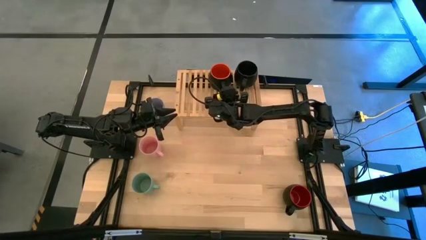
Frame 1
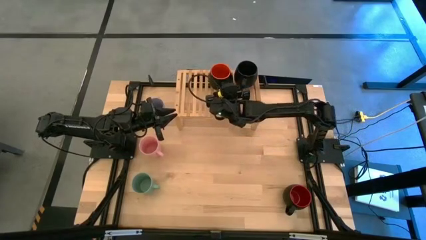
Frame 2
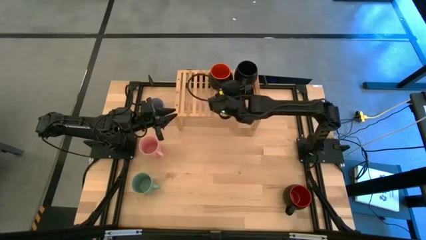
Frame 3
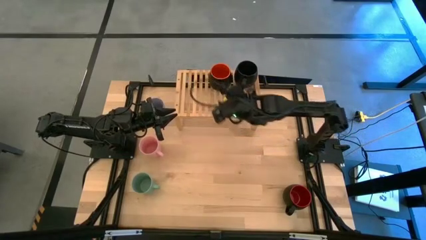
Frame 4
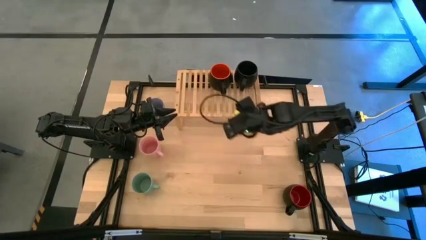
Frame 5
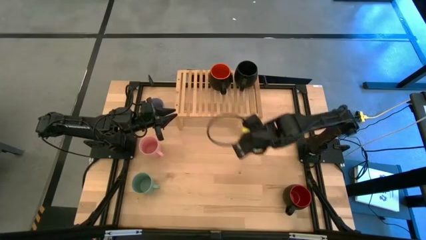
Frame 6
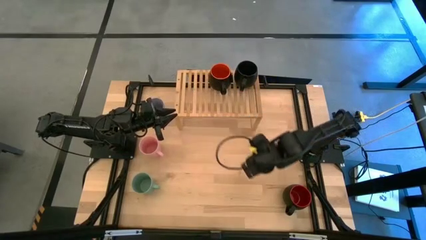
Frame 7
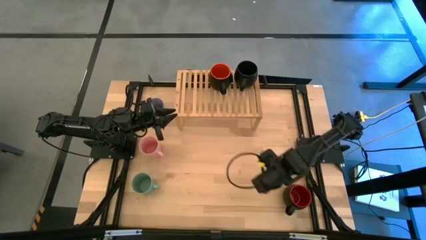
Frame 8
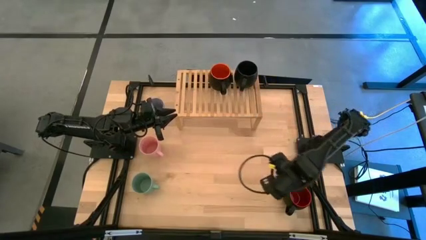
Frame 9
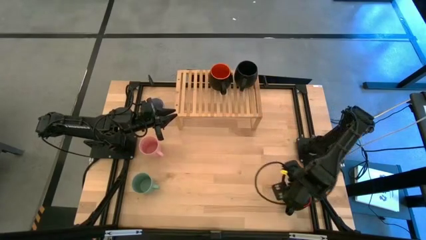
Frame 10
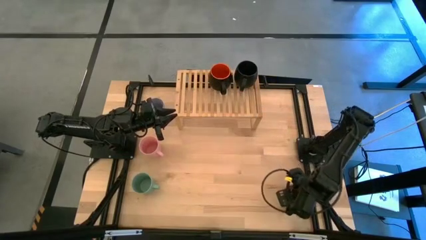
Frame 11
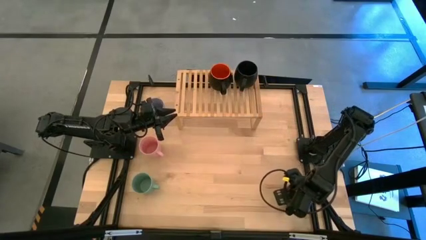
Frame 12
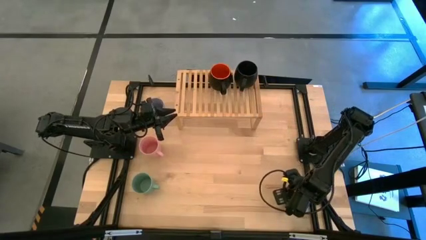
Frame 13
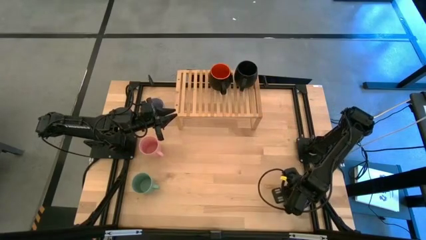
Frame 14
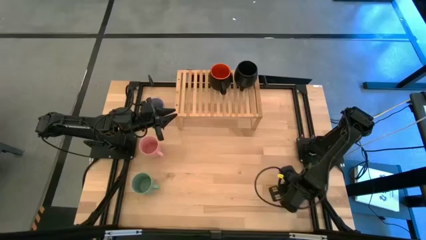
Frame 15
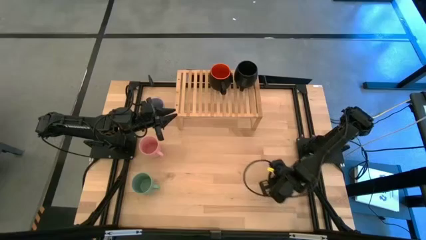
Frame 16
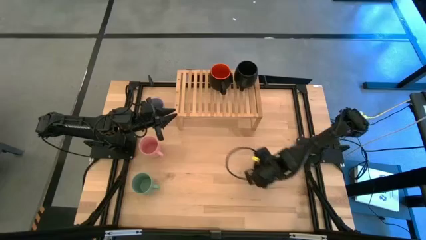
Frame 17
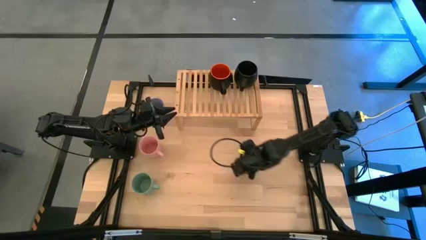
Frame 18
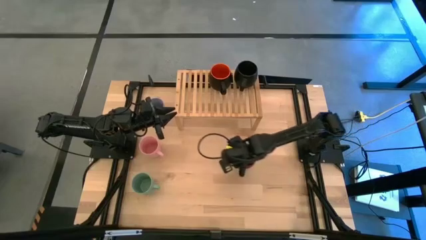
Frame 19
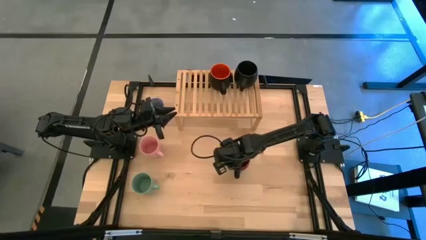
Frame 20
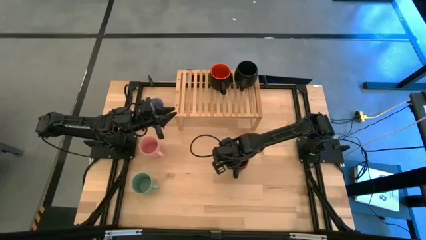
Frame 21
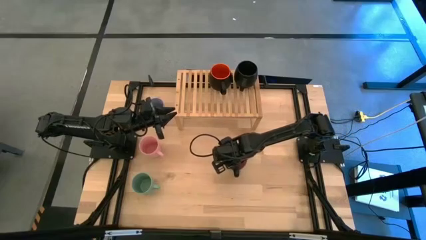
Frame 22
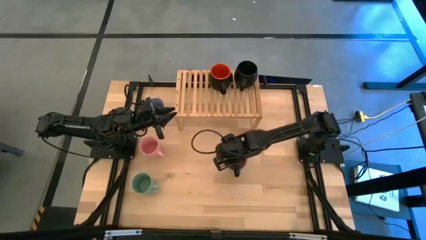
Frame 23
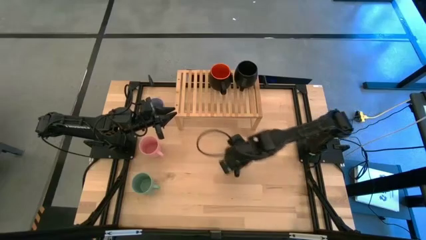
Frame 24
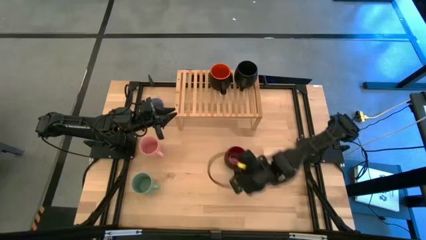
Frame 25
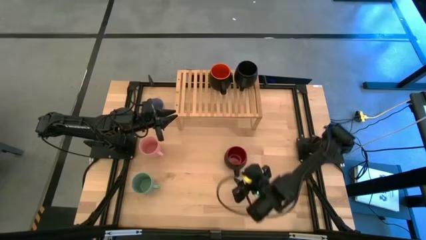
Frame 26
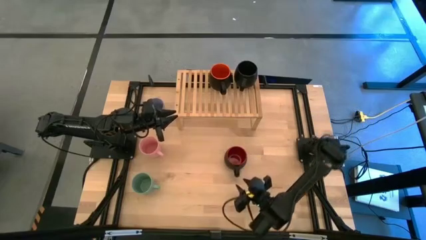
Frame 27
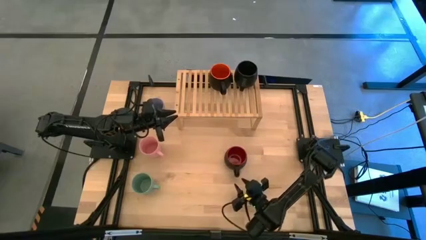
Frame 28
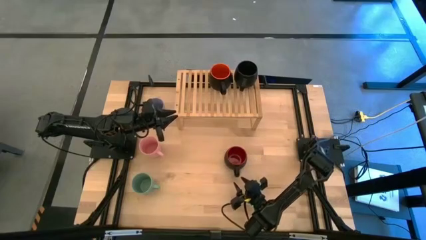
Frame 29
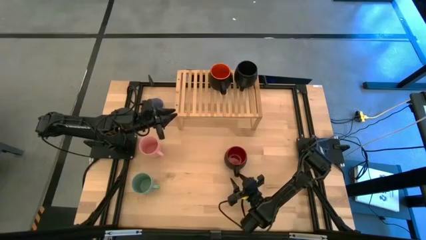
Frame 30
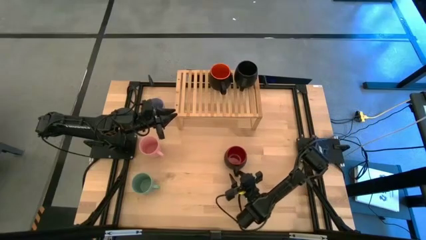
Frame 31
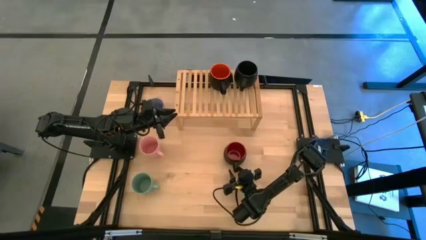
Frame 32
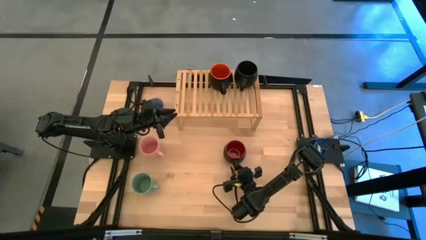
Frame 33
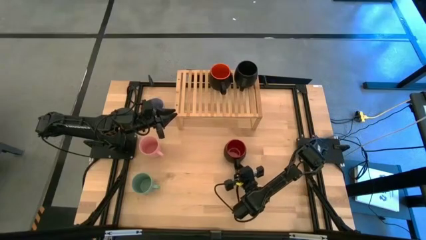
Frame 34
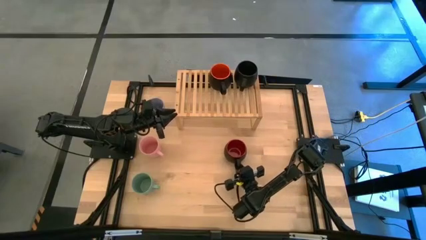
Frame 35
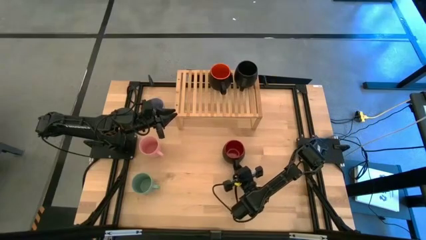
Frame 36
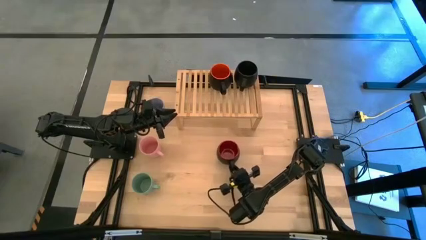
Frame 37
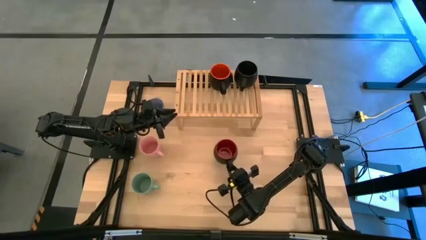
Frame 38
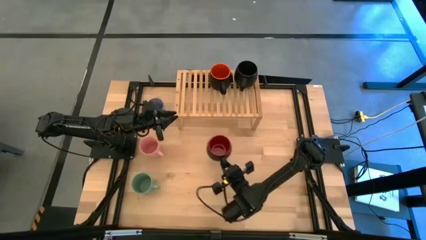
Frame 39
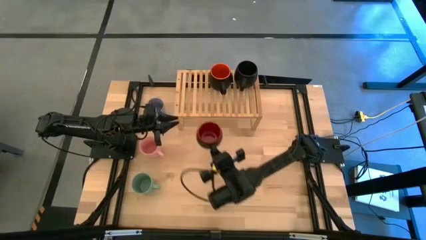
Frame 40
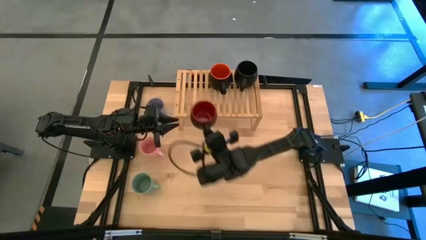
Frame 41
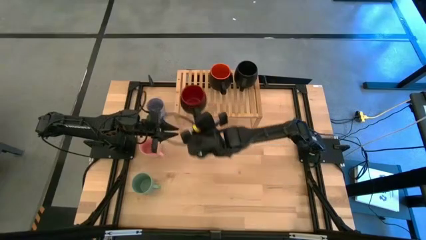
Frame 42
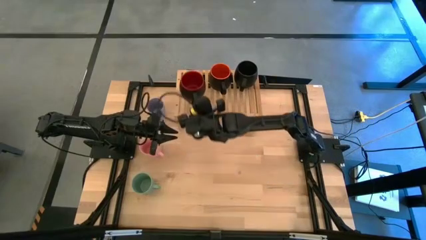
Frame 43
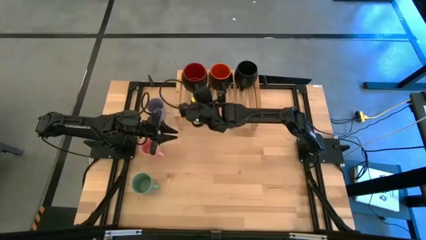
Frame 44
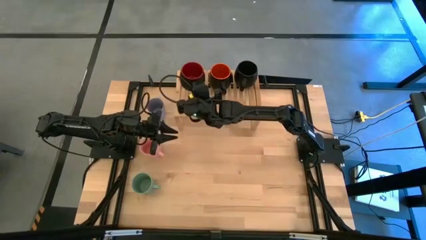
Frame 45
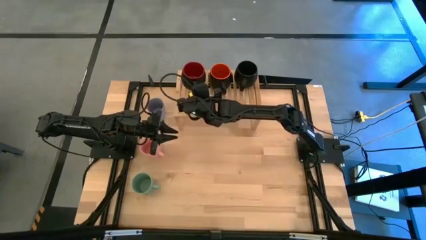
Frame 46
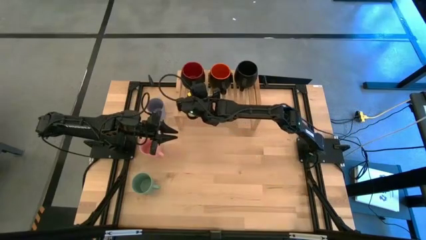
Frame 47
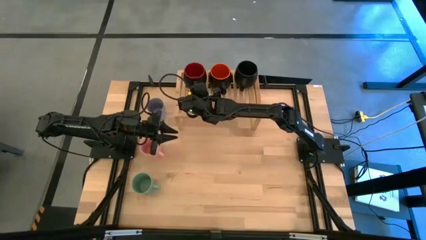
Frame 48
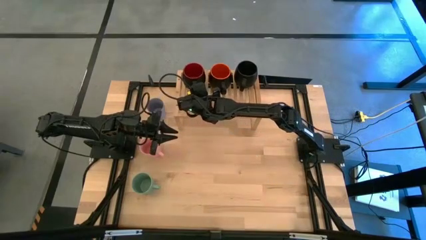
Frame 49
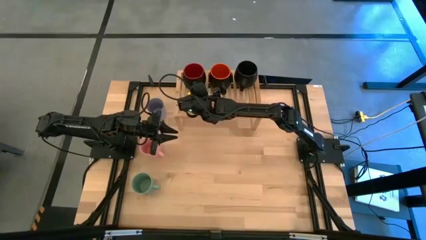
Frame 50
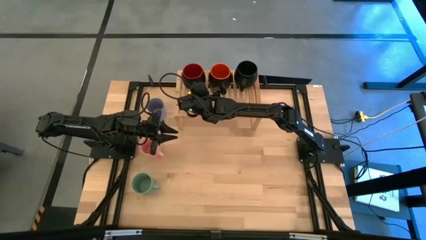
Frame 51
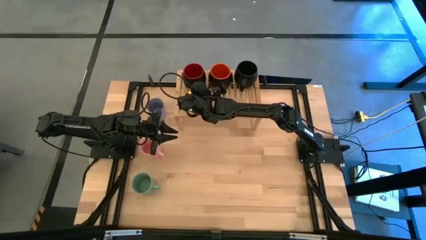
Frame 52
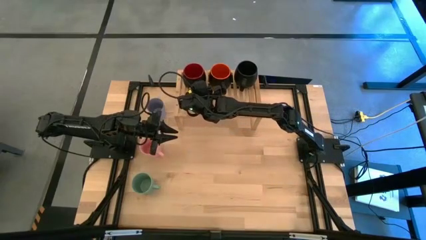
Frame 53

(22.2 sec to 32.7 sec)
Task: Place coffee mugs
Put the red mug on the shelf

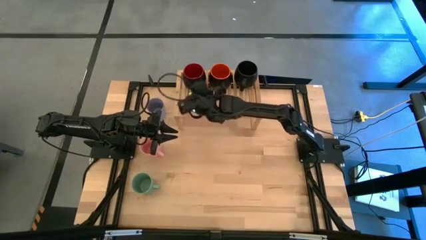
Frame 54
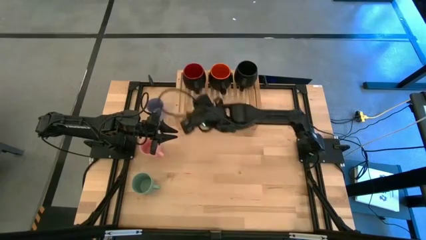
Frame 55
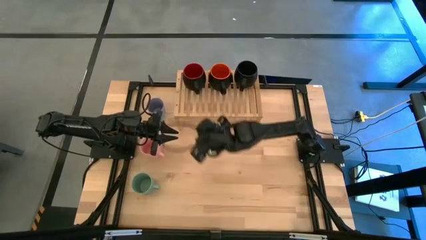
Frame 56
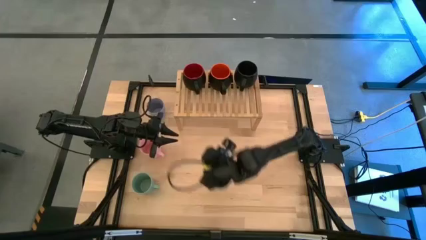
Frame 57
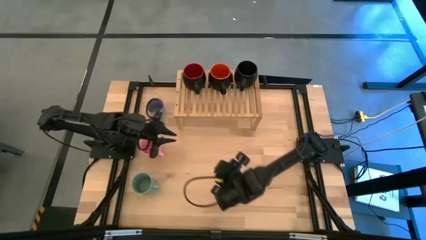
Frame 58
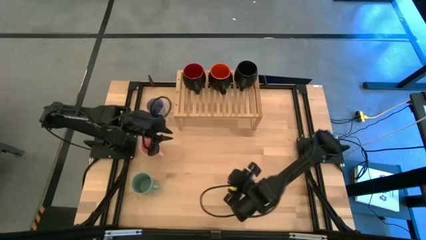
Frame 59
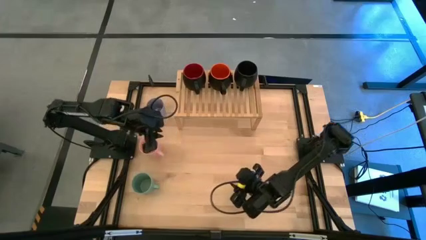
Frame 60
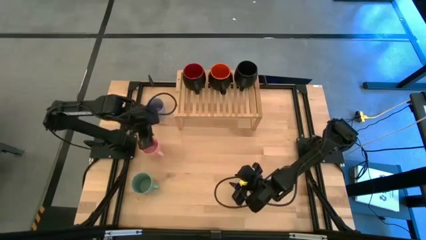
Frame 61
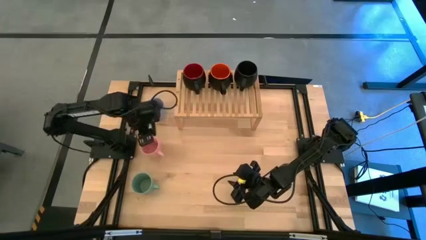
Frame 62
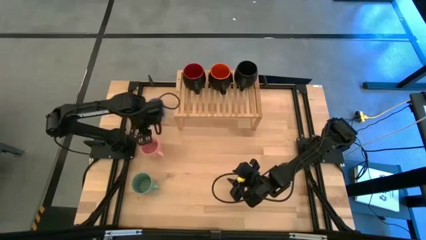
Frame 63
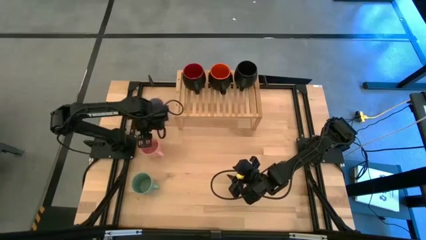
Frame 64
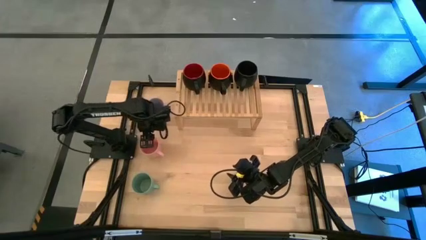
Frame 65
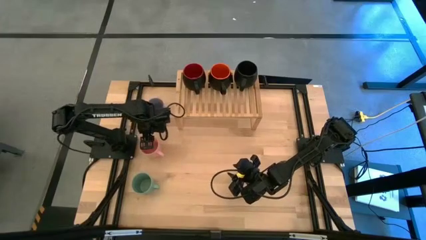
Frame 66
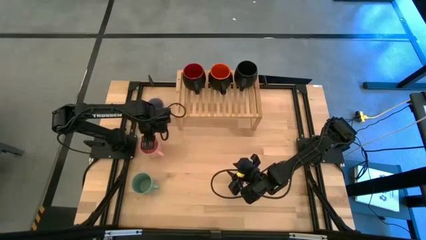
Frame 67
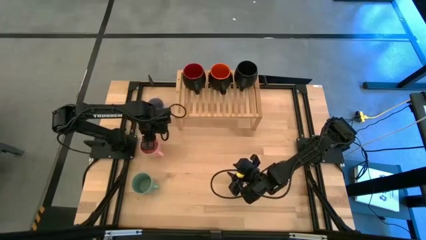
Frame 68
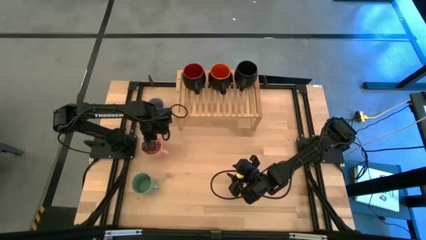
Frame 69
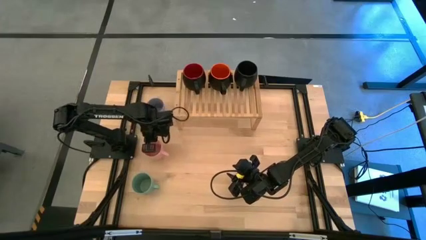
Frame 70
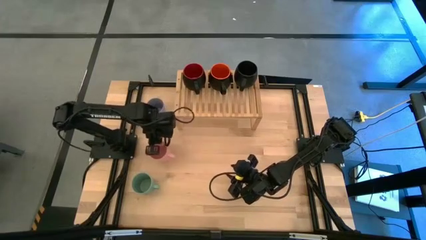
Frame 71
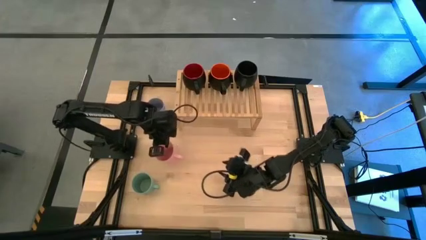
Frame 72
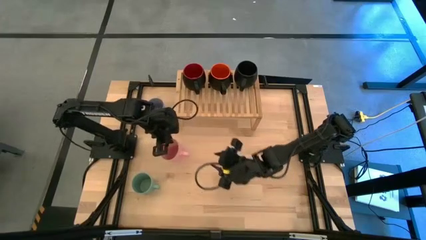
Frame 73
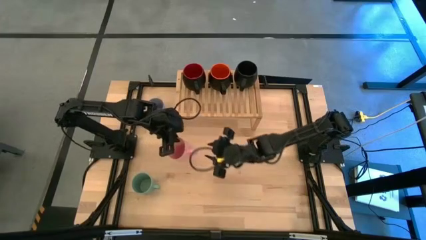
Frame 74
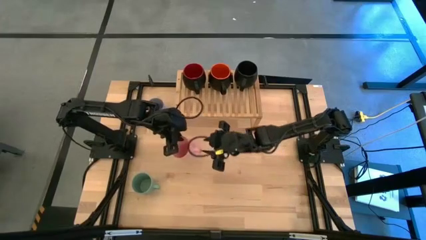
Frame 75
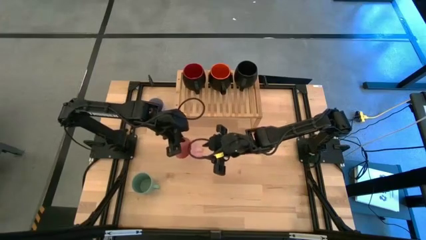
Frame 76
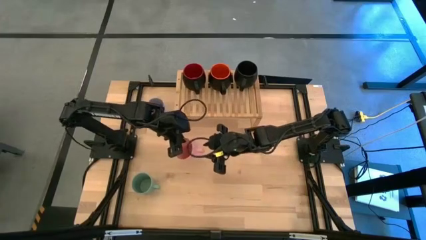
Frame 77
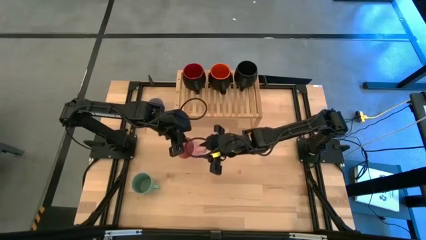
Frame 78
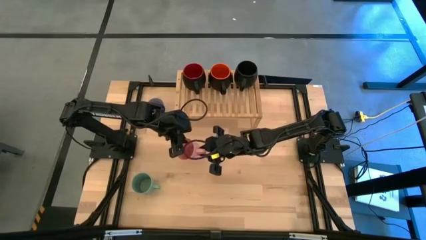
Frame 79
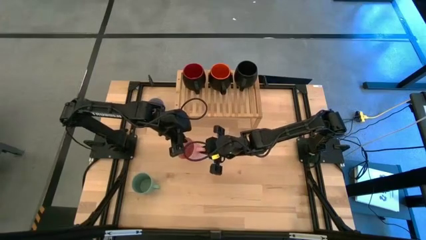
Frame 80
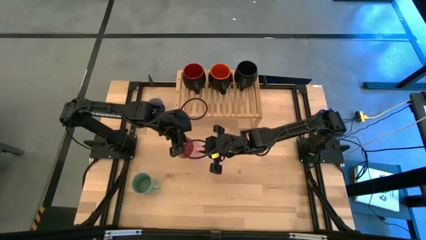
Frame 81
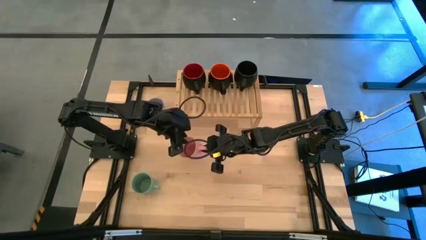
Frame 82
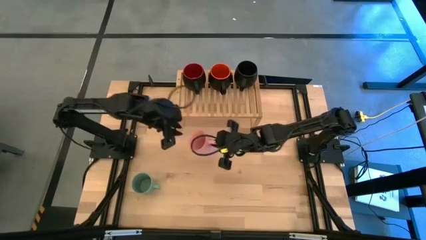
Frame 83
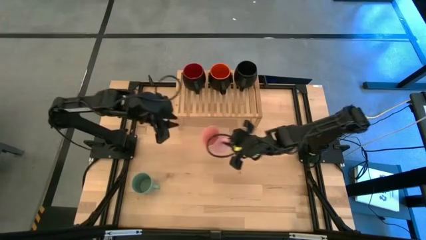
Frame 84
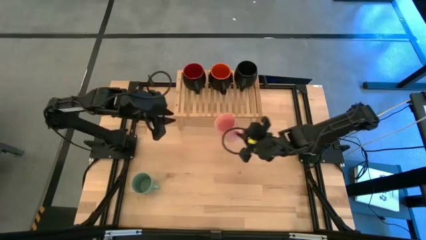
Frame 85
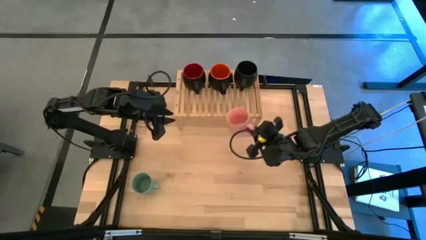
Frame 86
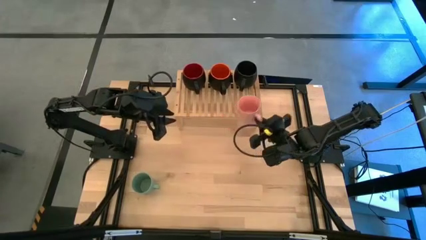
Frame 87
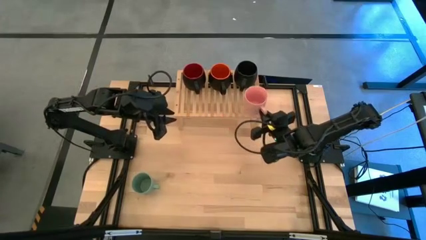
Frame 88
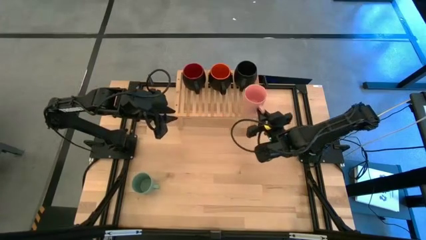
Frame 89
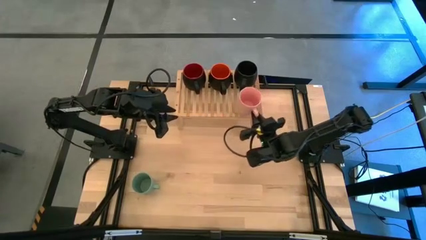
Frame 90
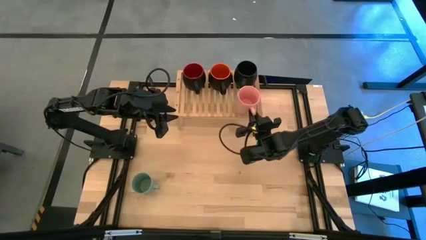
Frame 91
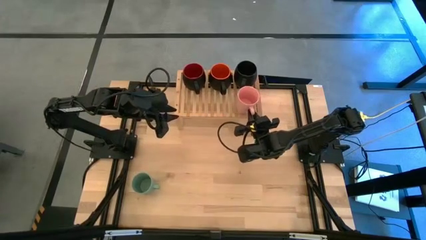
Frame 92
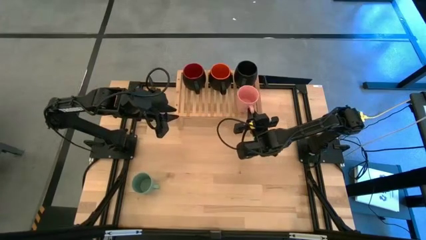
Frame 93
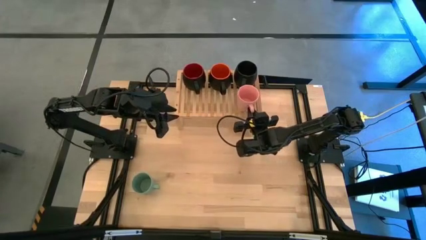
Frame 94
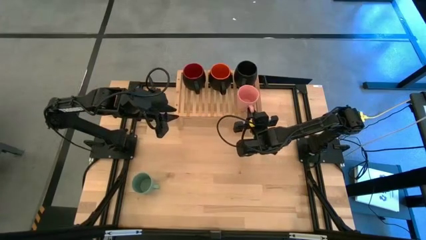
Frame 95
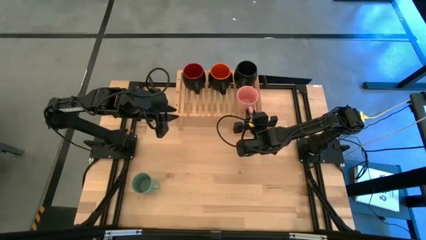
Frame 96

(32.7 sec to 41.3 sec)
Put the pink mug on the shelf
